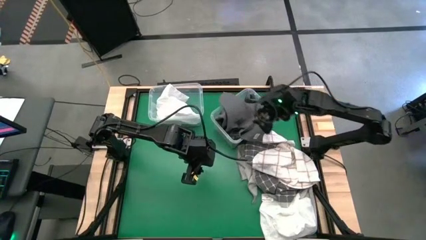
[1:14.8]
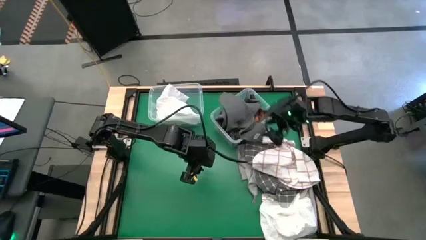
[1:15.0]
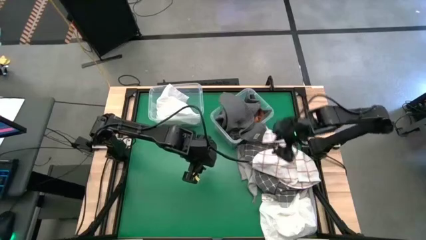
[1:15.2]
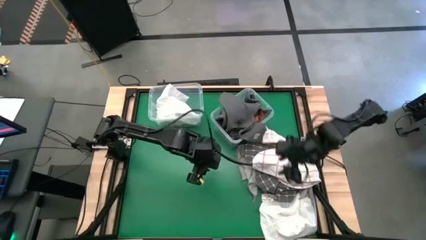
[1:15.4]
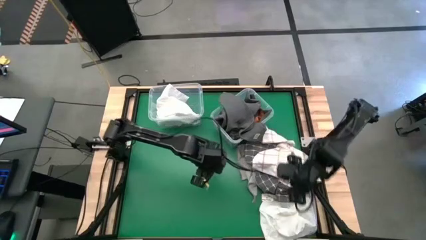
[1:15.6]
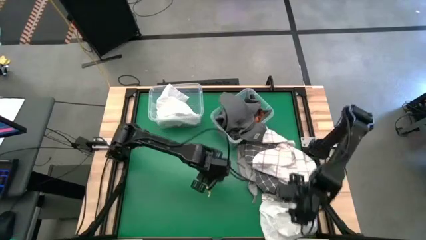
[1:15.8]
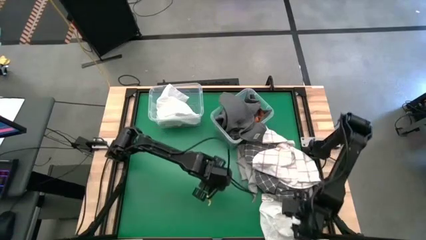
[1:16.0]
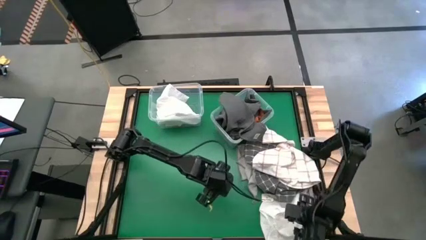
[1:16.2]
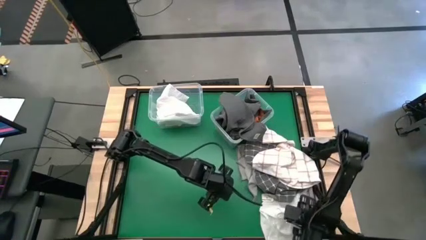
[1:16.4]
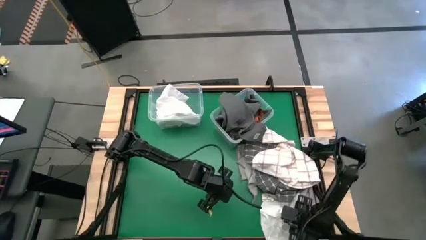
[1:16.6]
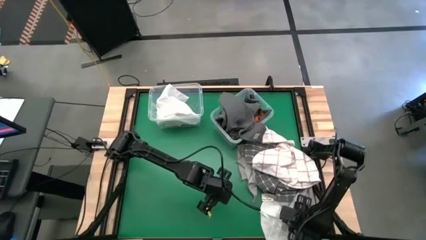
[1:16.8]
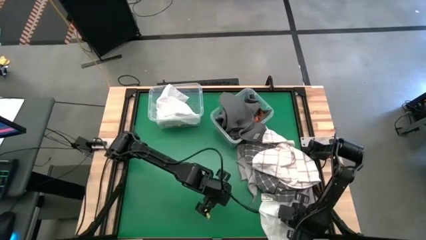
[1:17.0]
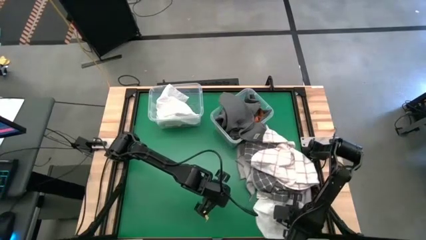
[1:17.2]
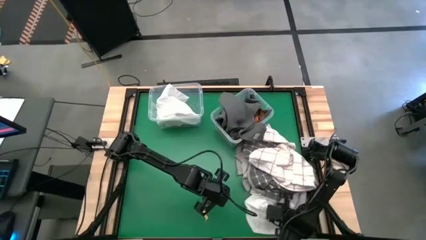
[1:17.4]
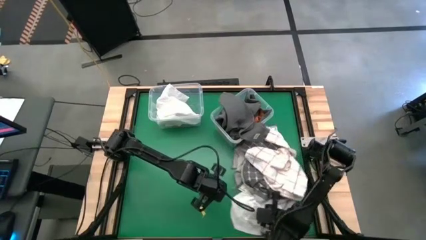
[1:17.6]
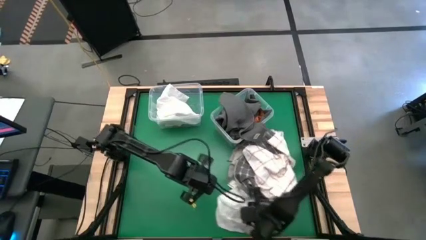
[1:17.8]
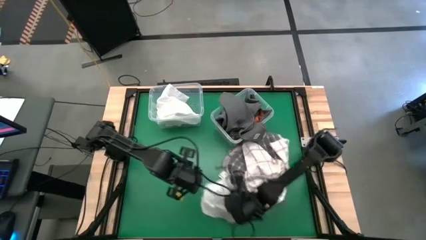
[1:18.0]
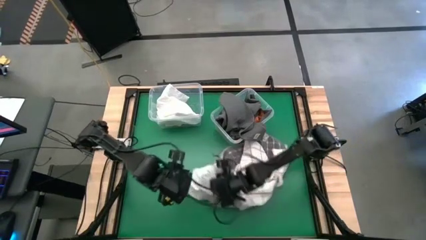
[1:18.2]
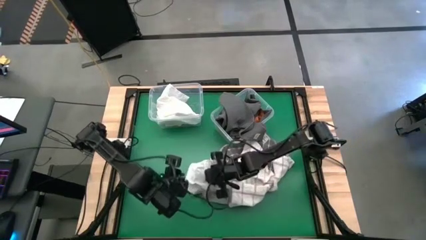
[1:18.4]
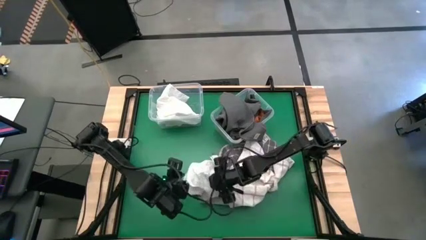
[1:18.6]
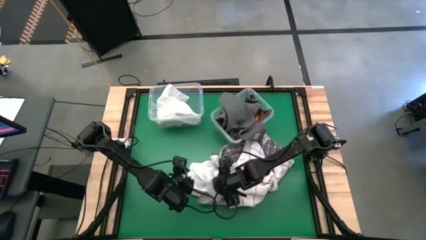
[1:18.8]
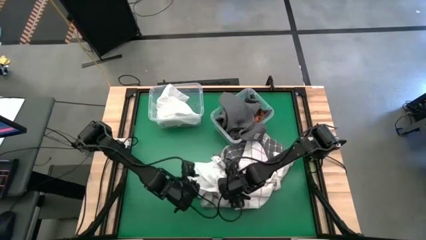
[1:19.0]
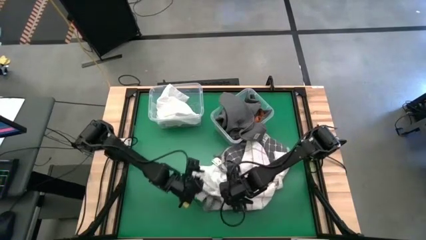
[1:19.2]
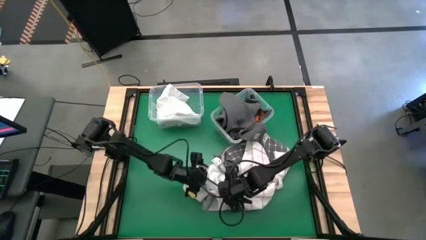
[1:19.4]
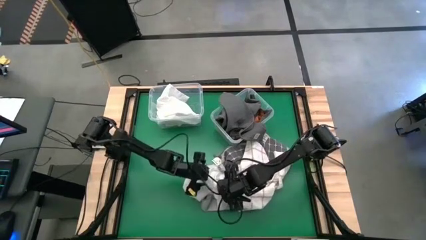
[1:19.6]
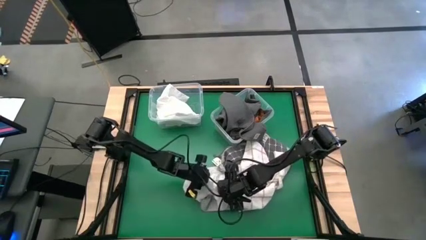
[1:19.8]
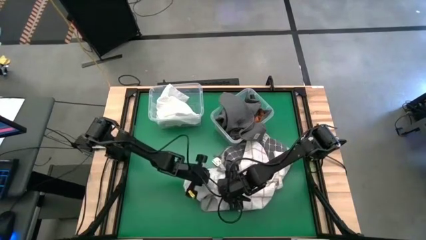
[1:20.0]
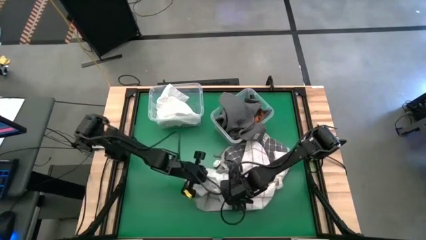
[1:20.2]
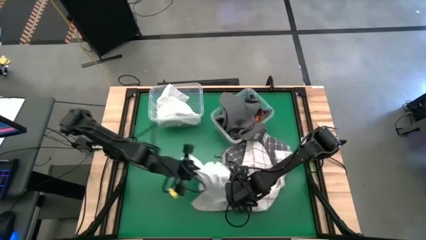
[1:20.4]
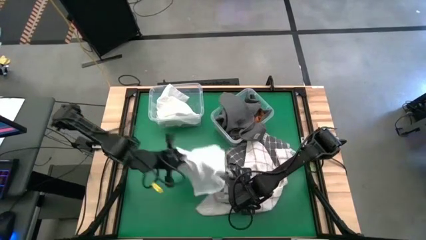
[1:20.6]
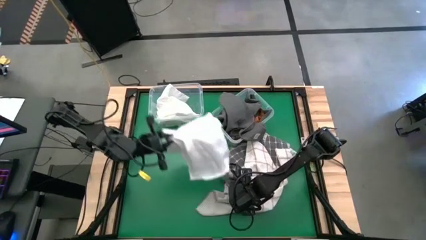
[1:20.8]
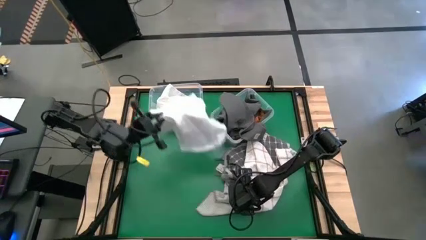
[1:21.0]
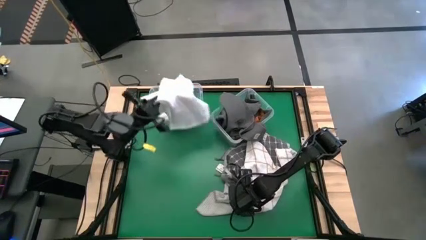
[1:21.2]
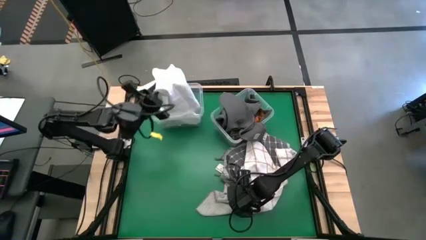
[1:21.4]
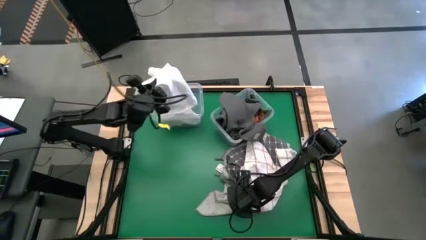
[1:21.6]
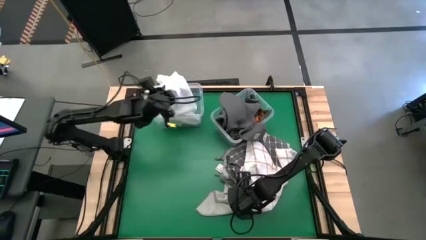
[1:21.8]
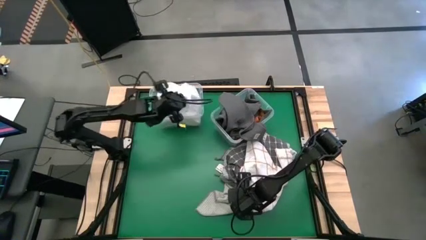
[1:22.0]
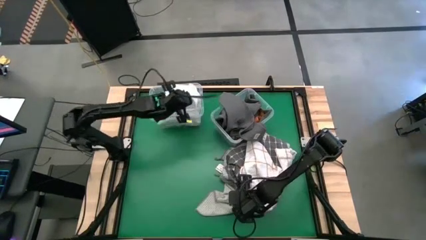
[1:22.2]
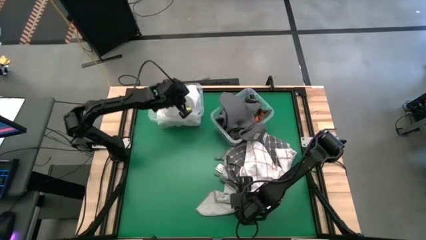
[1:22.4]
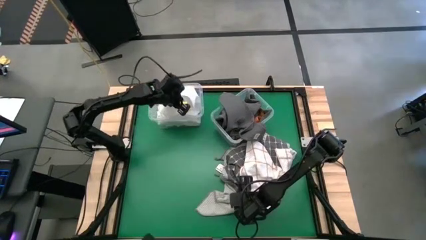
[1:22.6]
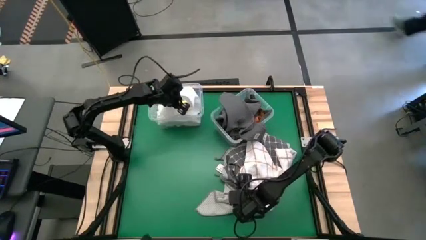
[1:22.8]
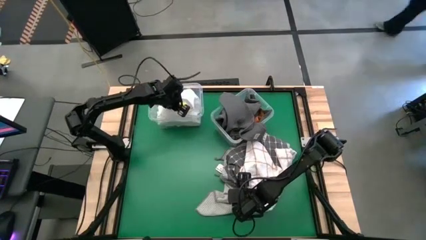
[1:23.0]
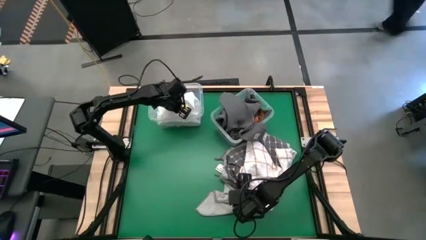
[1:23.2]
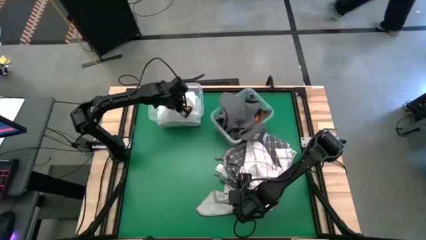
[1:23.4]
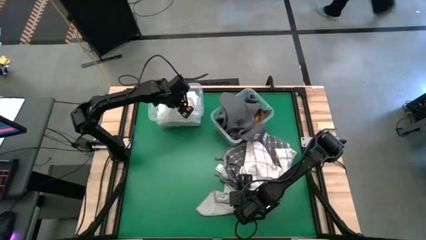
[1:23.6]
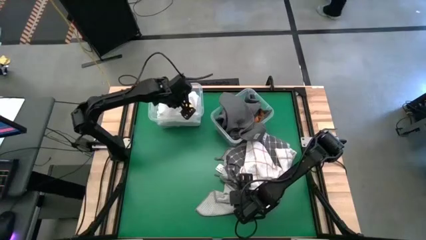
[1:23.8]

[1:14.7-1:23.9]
Task: Sort towels by color in basket
Put the white towel into the left transparent bin
